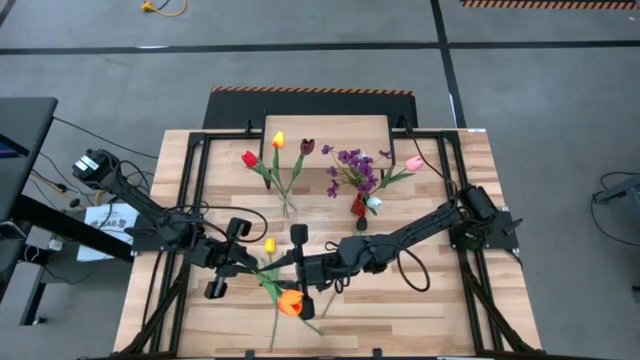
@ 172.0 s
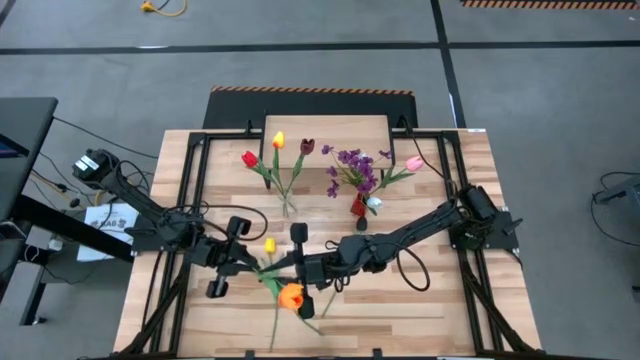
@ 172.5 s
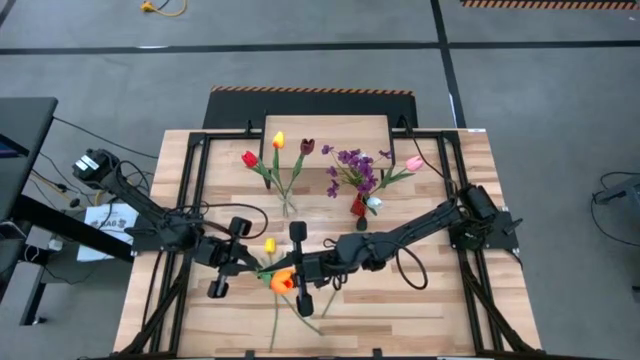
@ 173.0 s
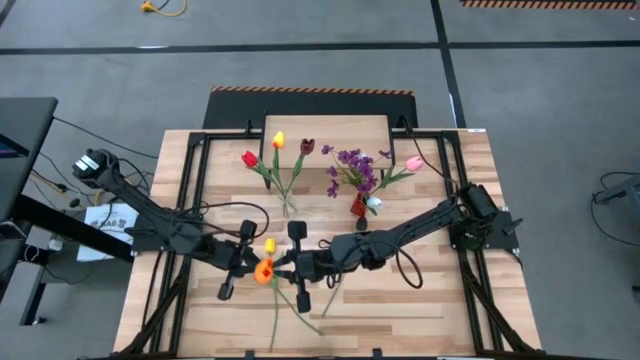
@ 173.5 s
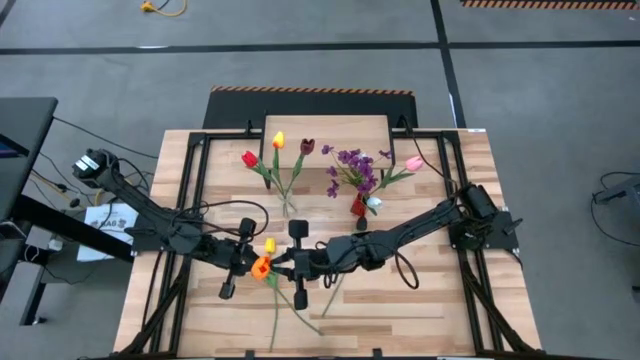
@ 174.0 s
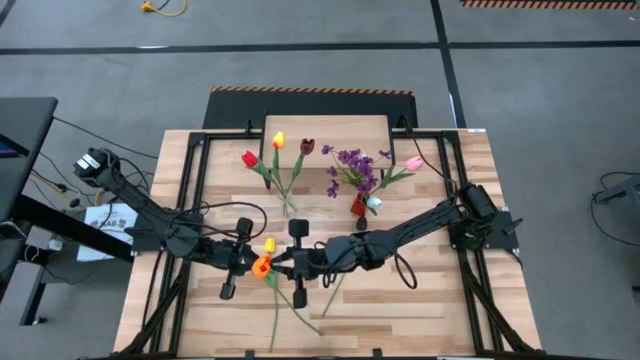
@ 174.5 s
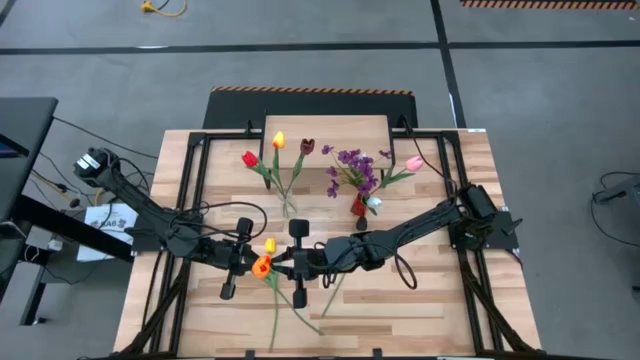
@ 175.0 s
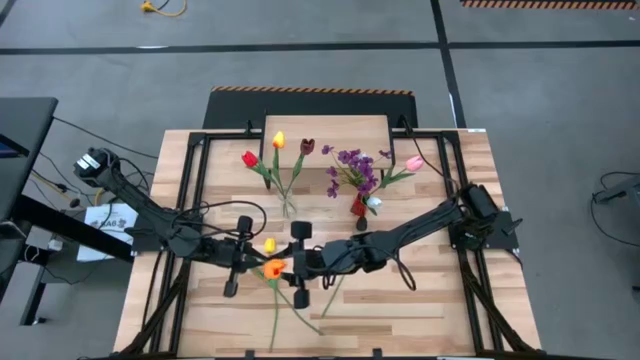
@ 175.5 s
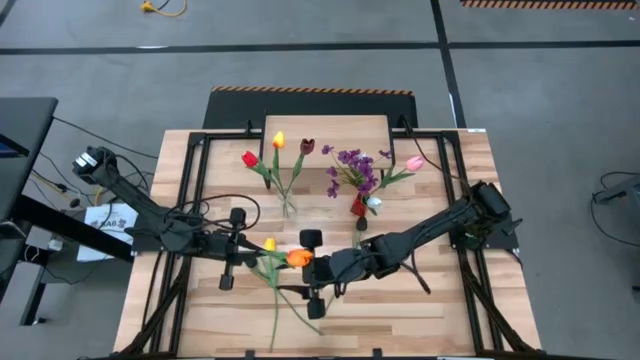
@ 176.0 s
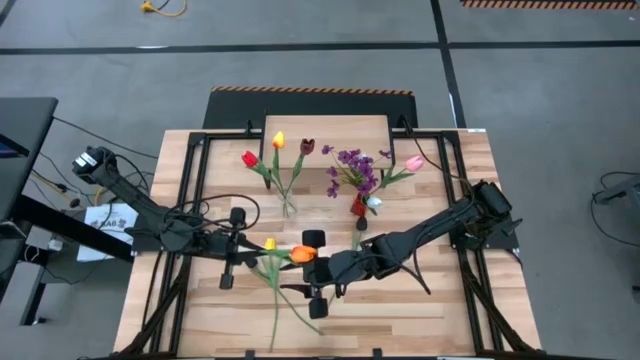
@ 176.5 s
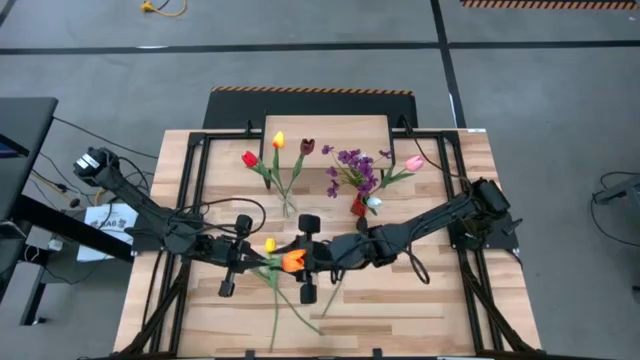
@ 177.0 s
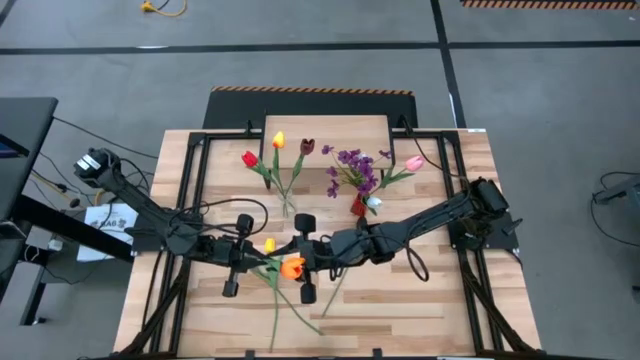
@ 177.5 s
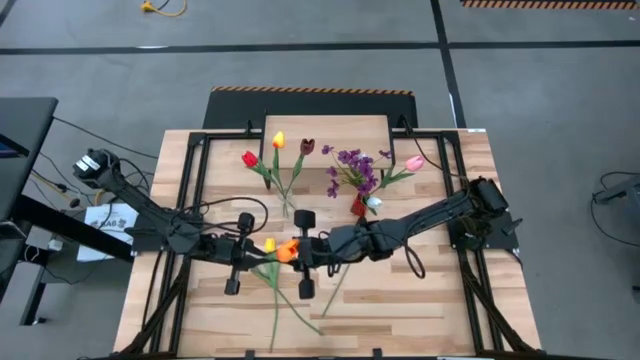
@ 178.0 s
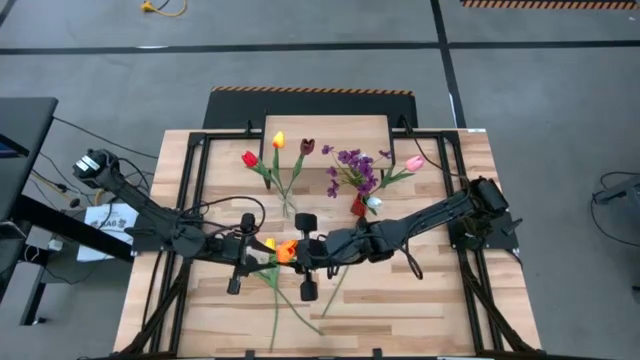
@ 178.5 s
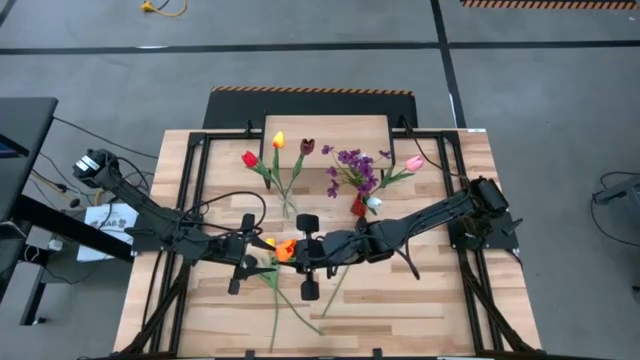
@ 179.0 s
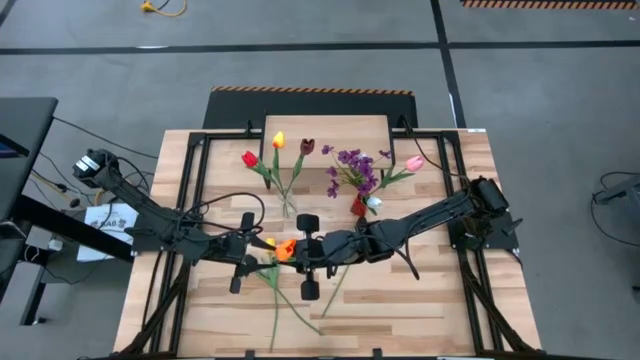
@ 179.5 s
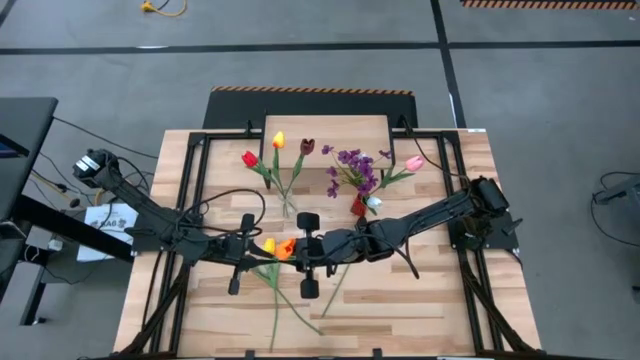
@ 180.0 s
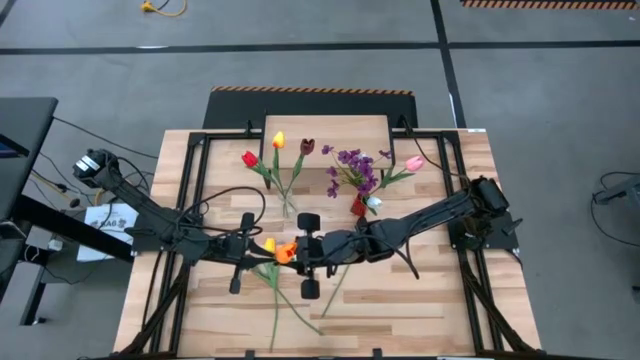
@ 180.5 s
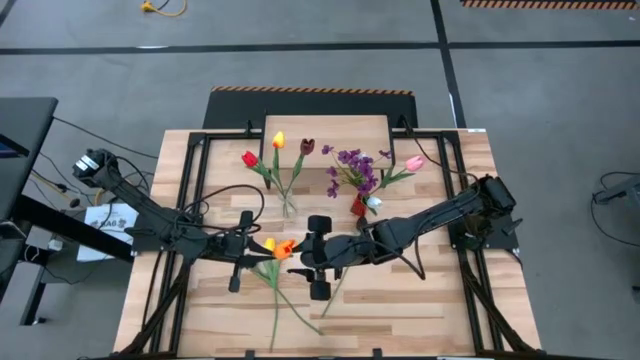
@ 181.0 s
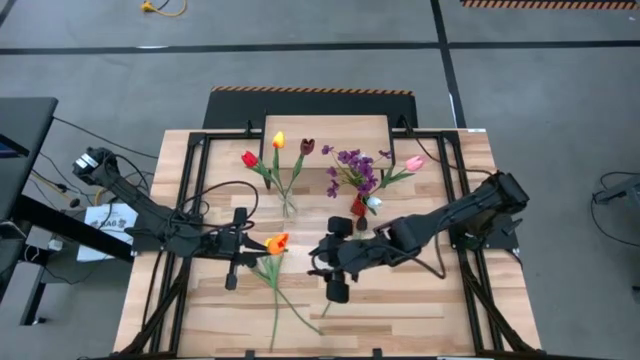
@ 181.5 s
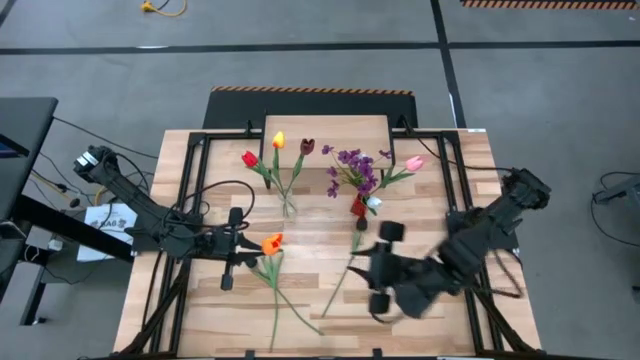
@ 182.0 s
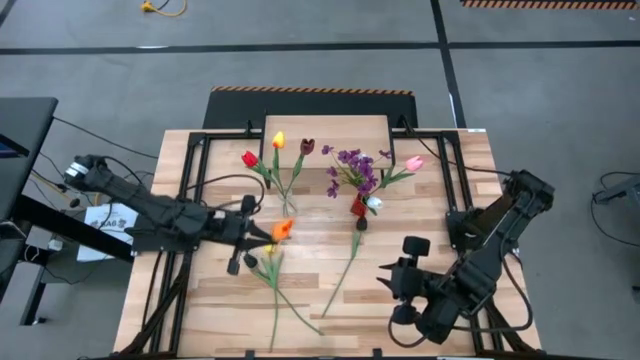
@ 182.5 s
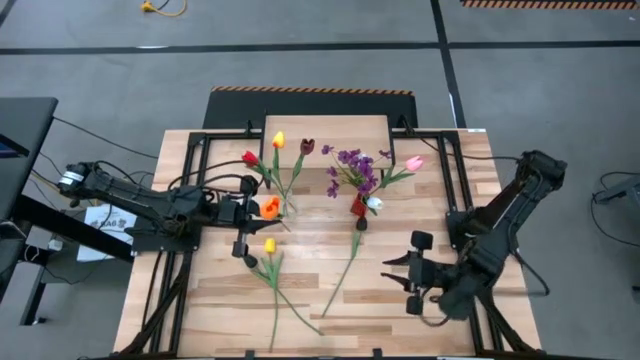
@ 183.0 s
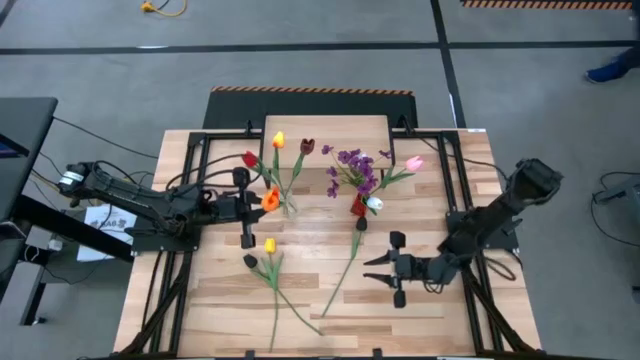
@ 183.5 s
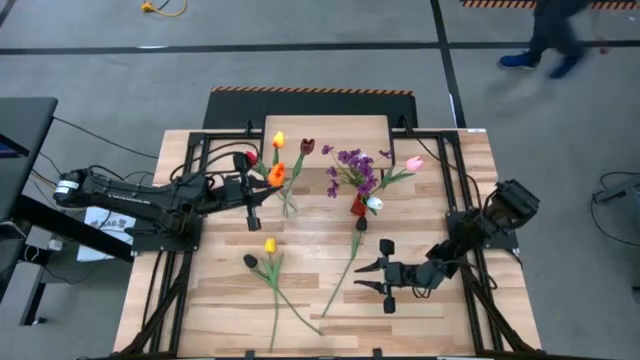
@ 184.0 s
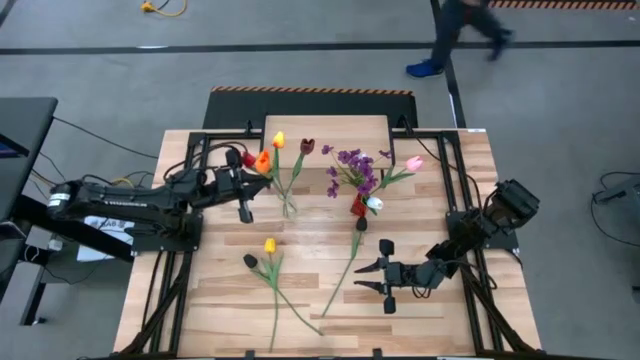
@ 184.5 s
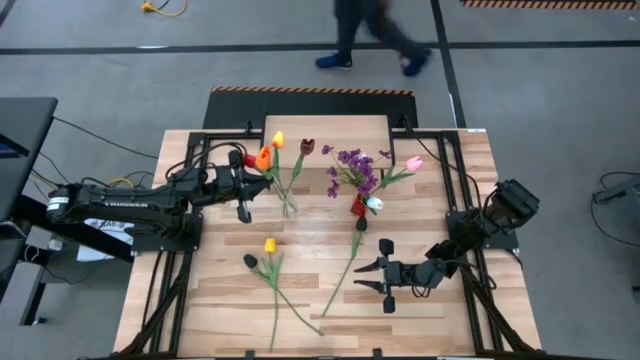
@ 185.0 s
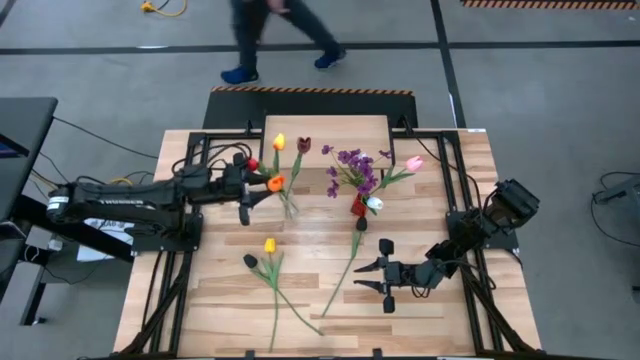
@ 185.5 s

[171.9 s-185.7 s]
Task: Pick and place flowers into a vace then onto a shelf
Put the orange flower into the transparent flower vase

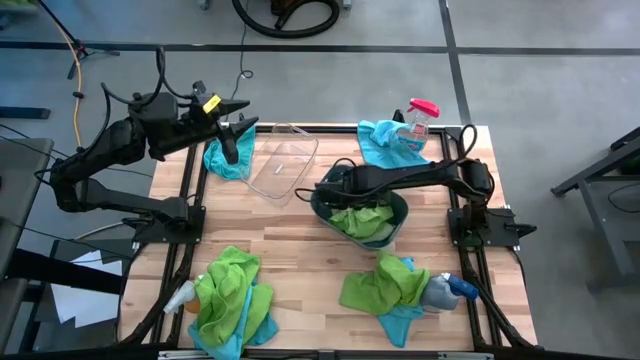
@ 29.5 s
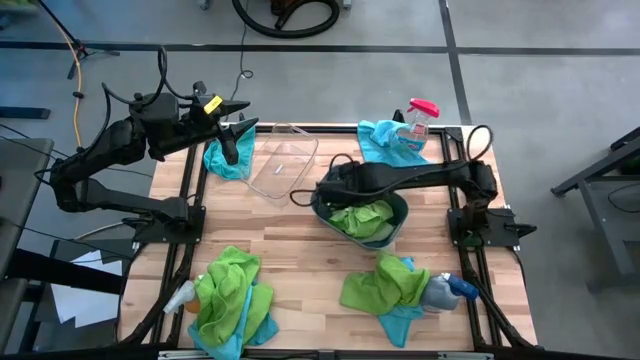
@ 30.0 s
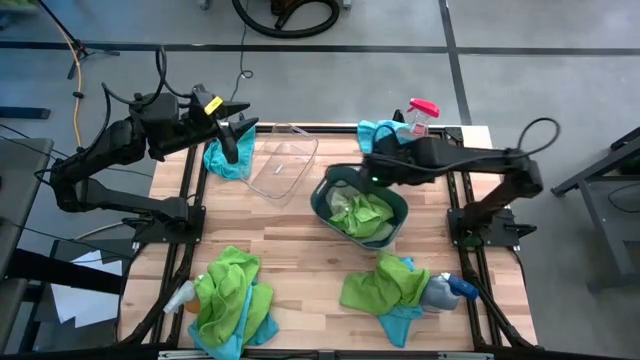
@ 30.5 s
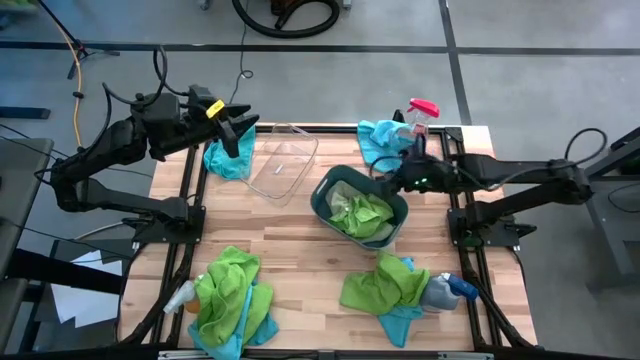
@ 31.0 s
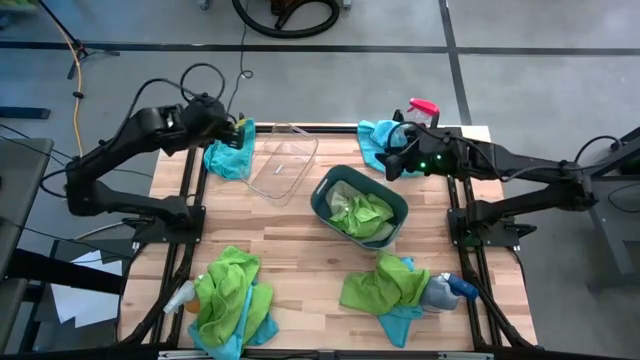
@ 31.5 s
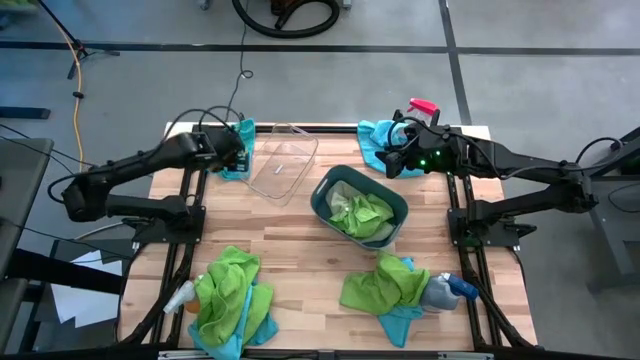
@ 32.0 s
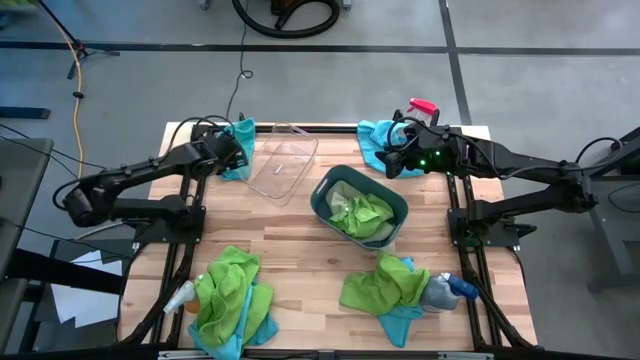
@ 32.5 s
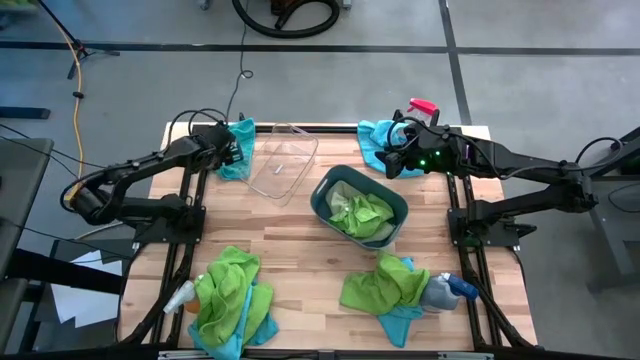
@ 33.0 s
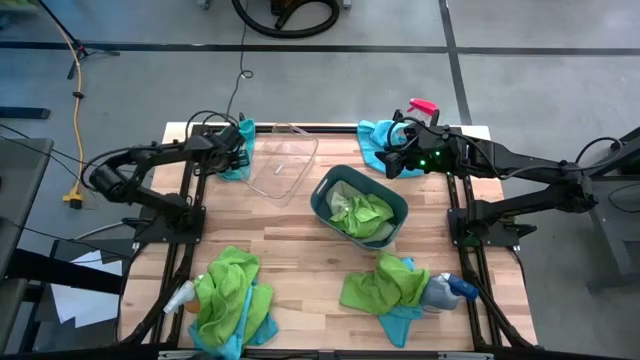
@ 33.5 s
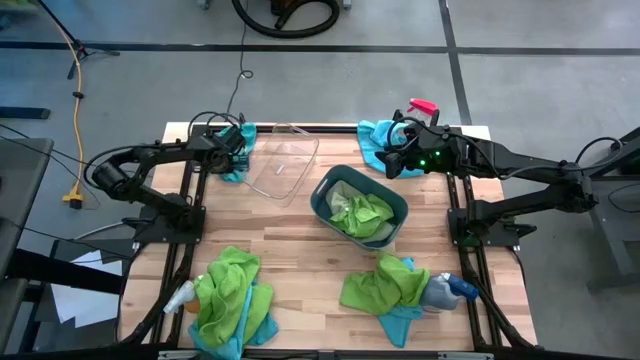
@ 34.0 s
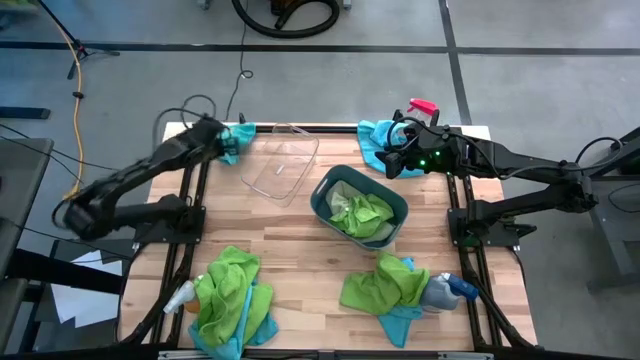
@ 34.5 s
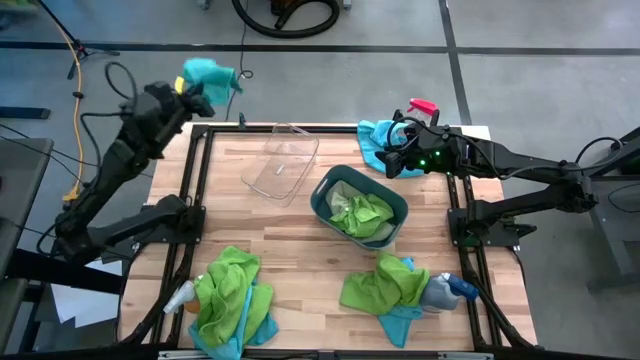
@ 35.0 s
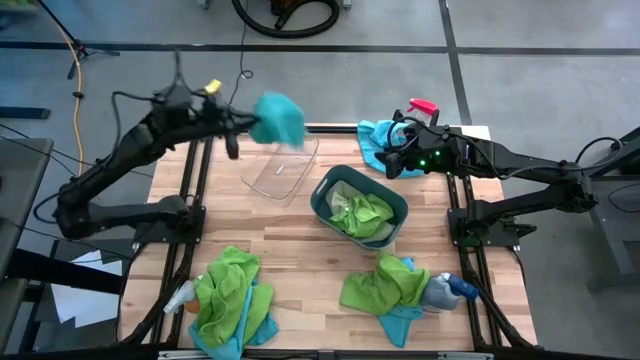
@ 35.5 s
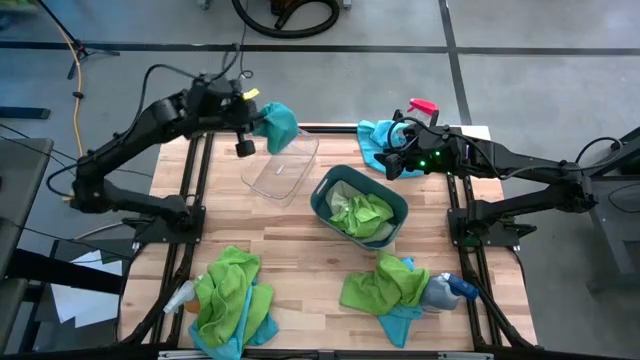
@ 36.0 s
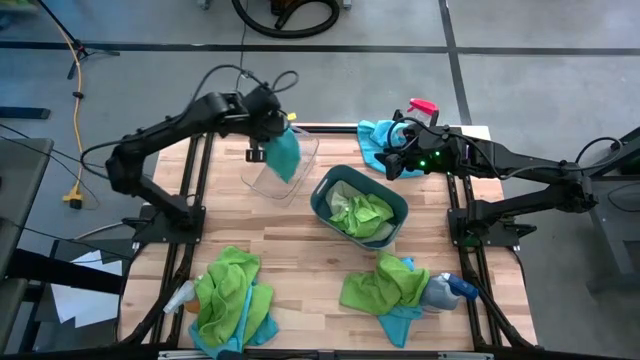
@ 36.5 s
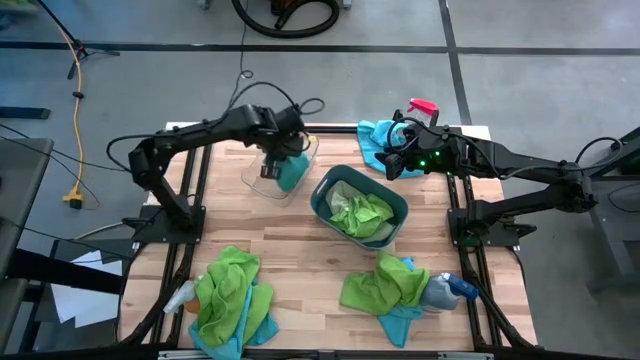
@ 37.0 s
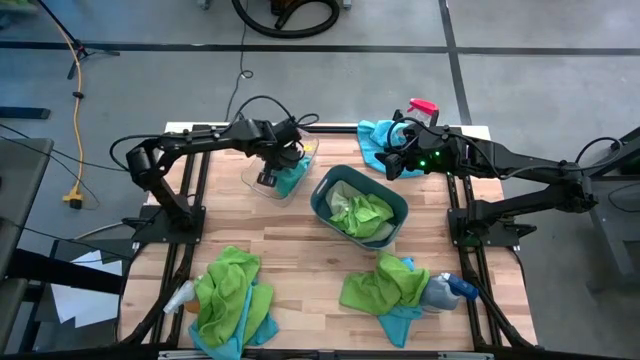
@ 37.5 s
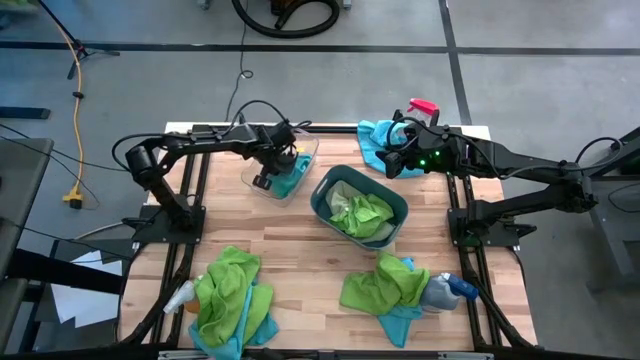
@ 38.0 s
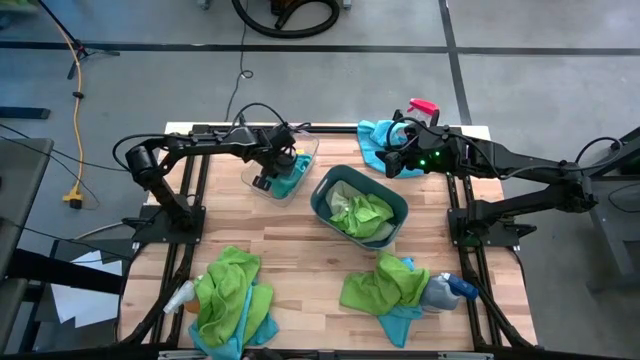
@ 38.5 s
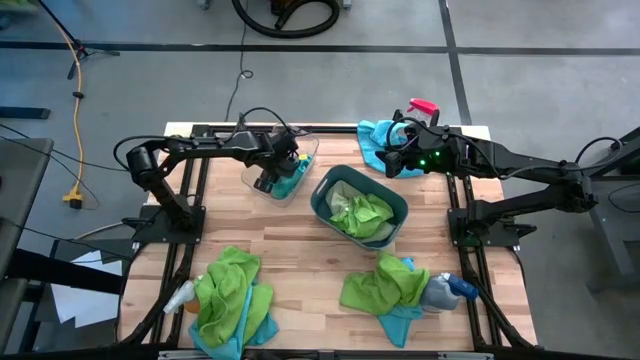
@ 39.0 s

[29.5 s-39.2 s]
Task: Sort microfiber towel by color & place in baskets
Put the blue microfiber towel into the transparent bin
